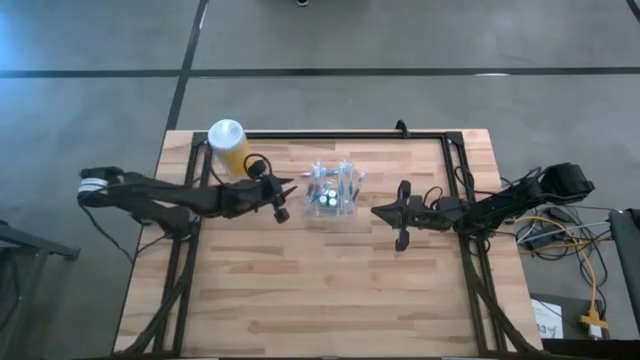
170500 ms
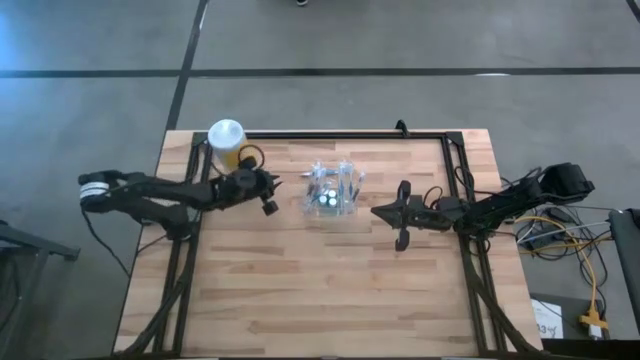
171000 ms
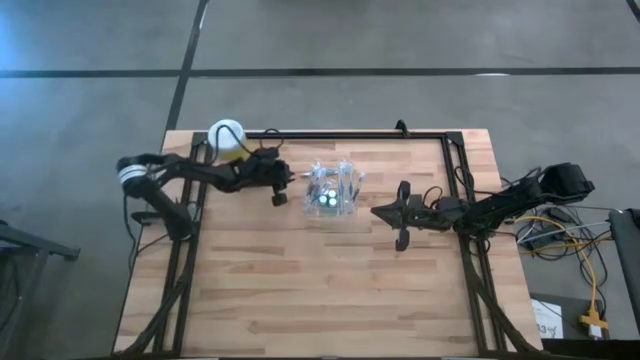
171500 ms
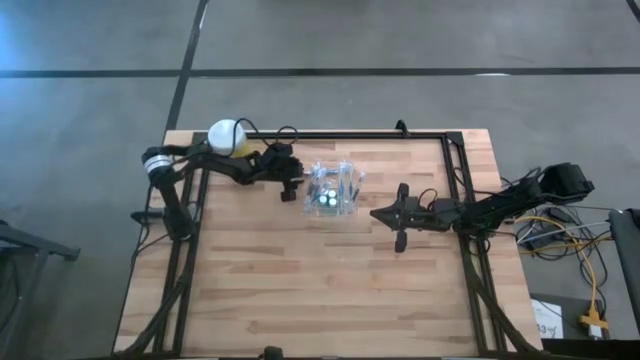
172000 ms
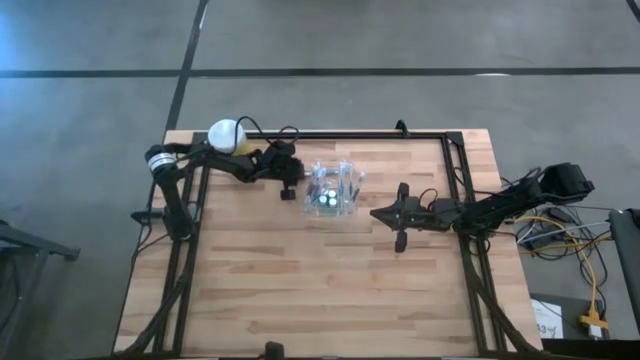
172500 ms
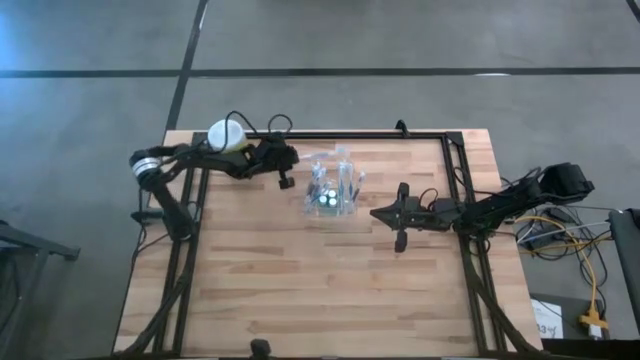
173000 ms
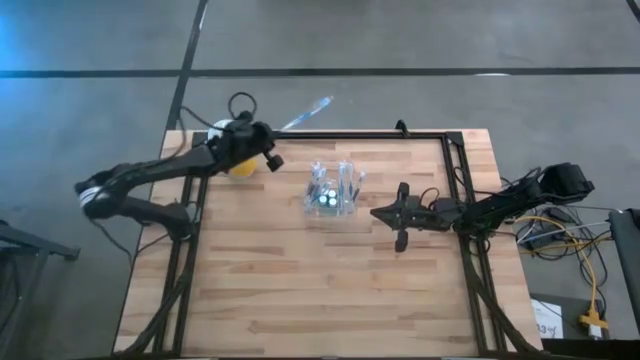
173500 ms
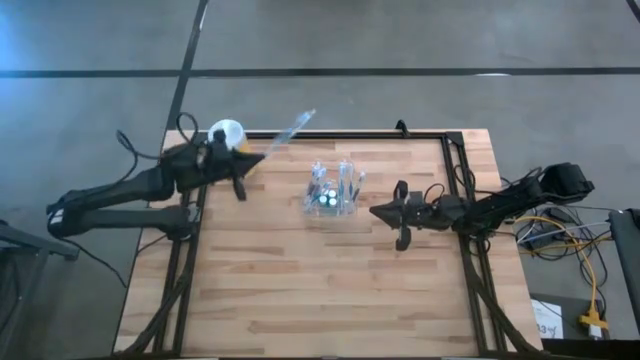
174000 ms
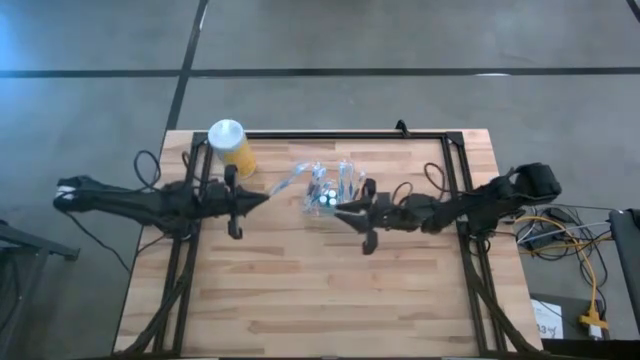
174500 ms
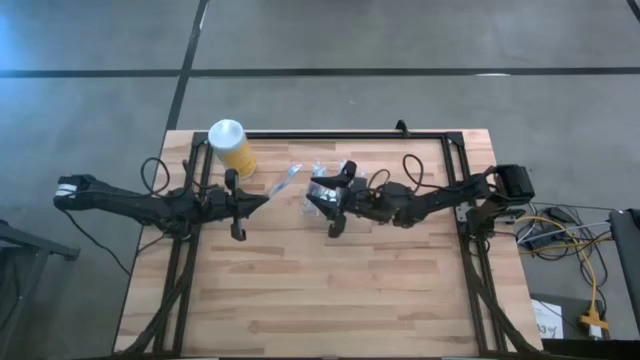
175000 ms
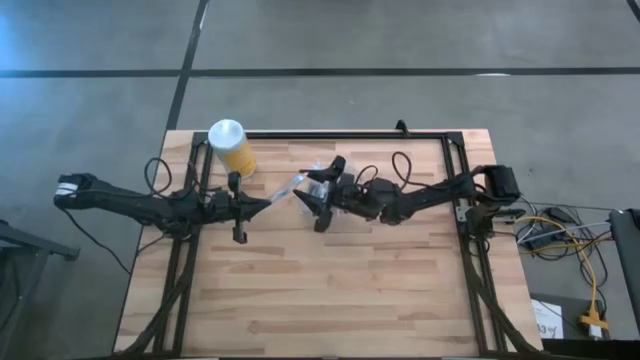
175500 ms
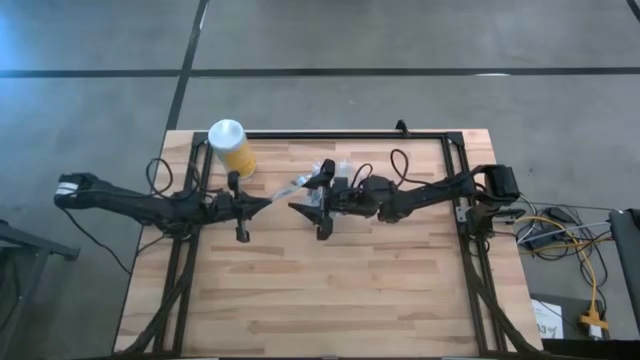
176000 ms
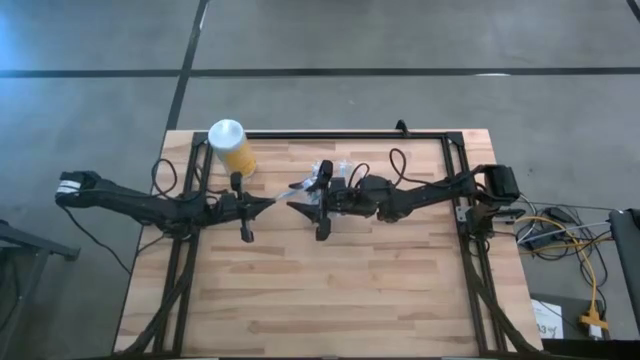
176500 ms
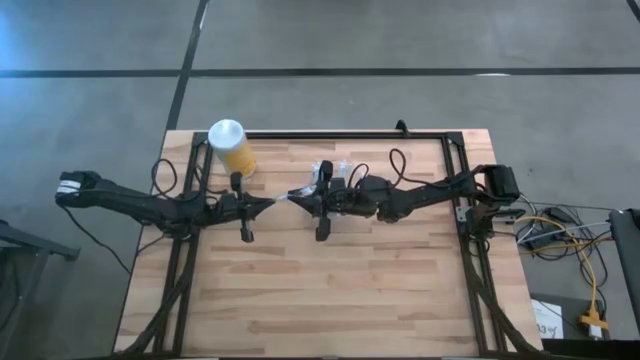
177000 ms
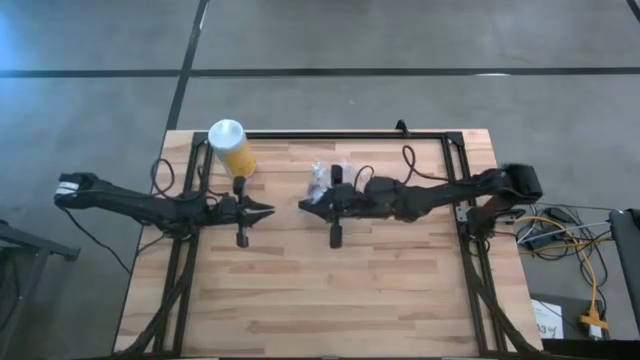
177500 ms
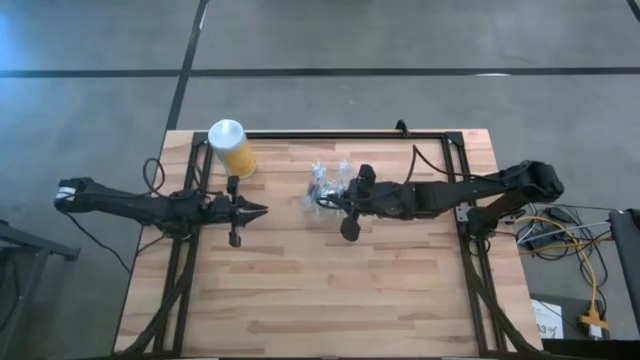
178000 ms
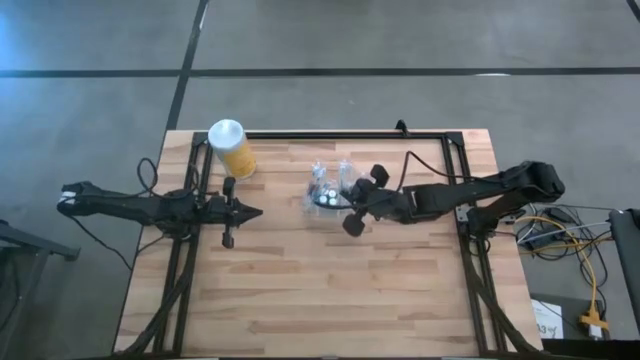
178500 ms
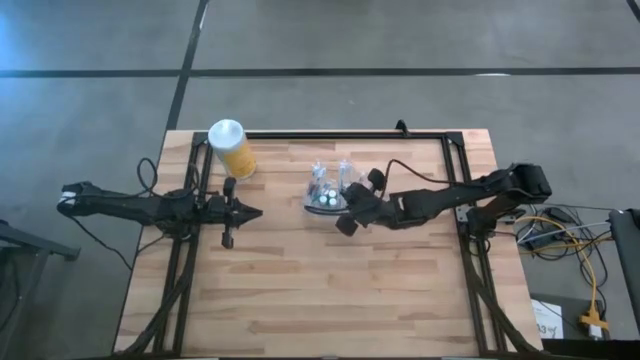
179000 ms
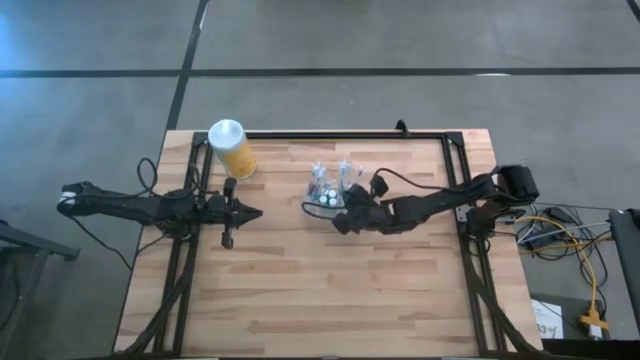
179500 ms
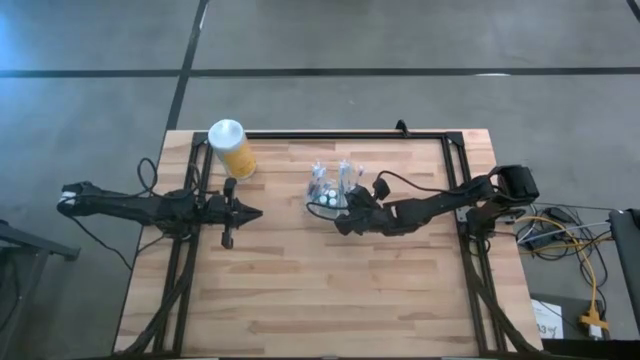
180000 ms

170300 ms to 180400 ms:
Task: Pick & Place toothbrushing station
Put the blue toothbrush into the right section of the transparent organizer

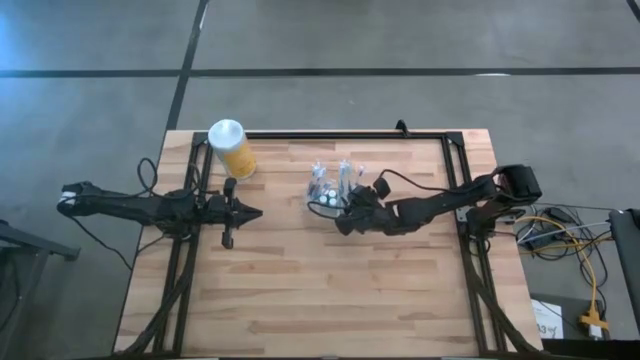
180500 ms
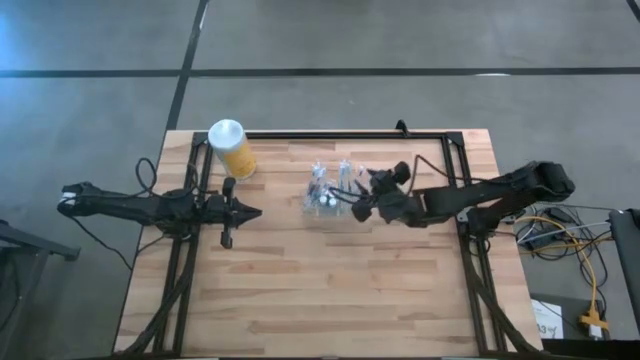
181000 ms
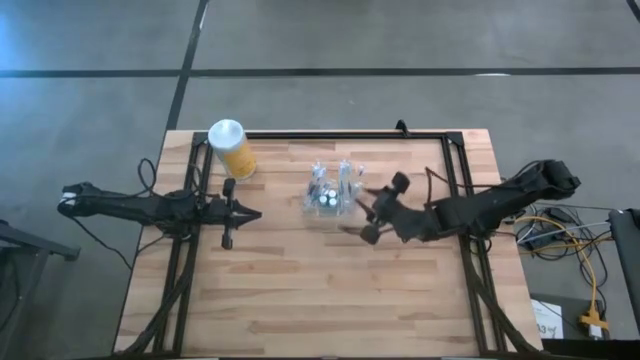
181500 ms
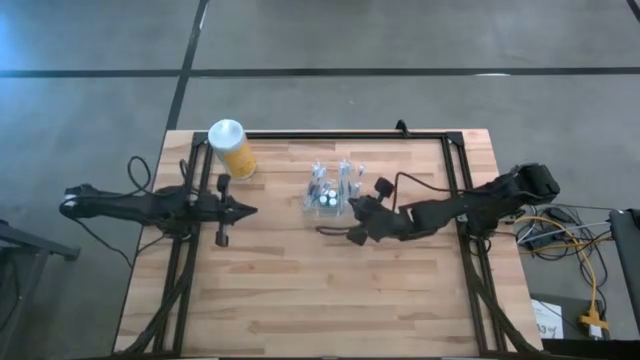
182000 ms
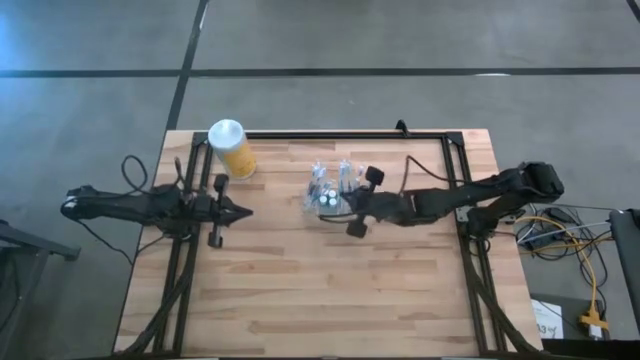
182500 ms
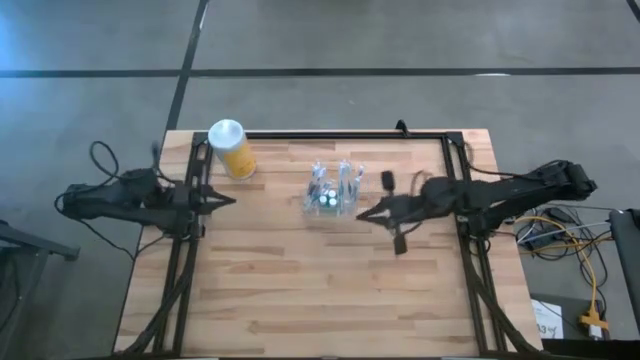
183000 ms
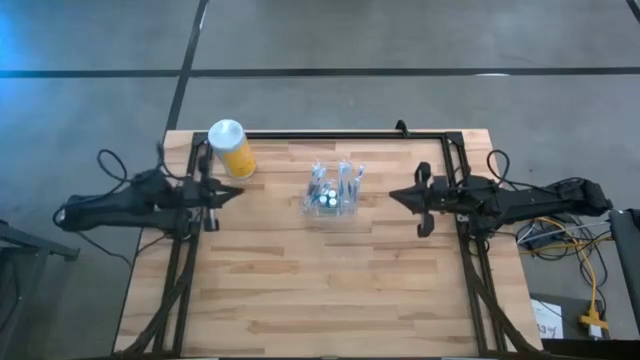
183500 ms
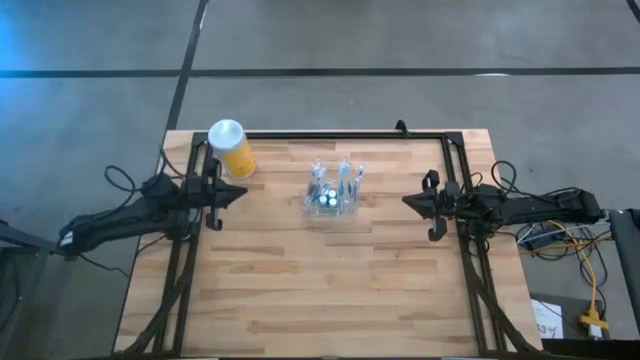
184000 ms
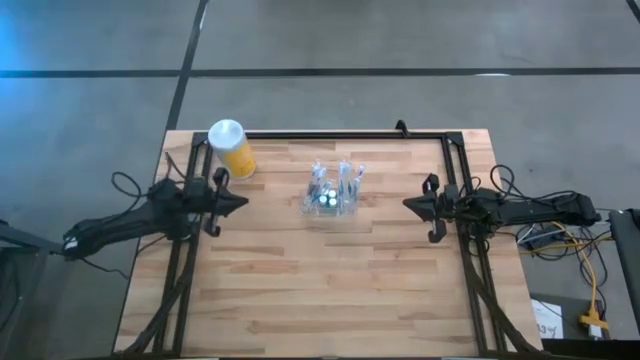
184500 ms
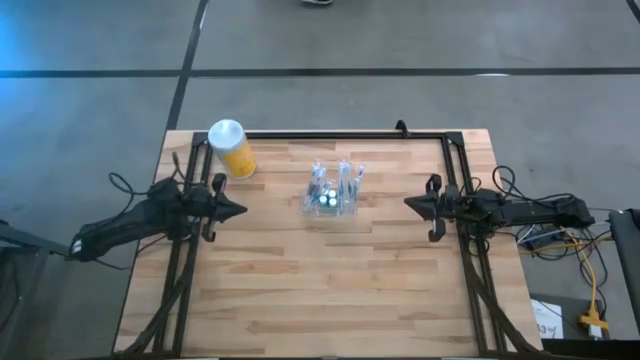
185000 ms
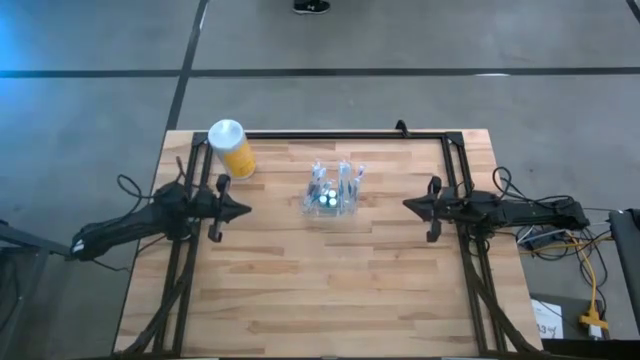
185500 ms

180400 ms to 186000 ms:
Return to Home Position

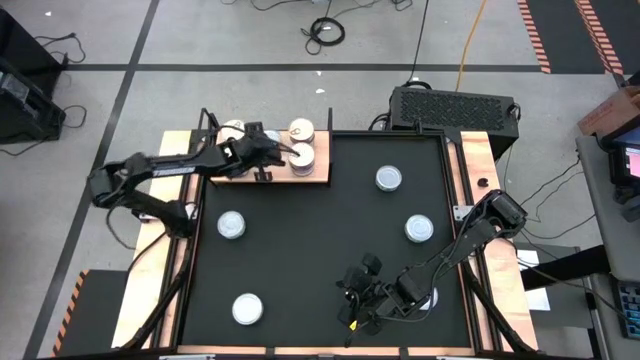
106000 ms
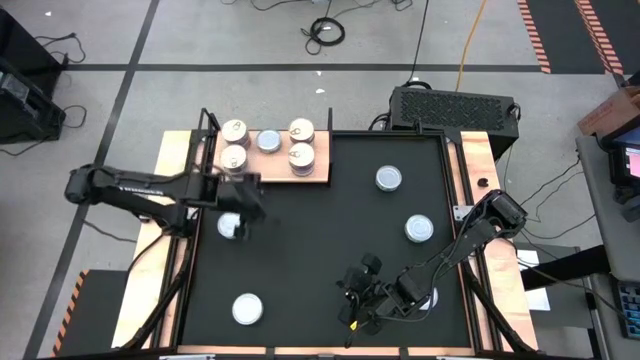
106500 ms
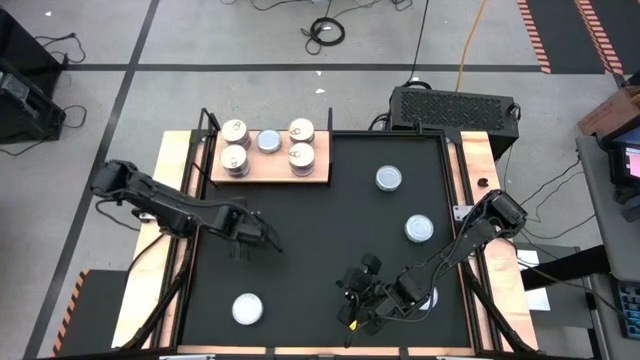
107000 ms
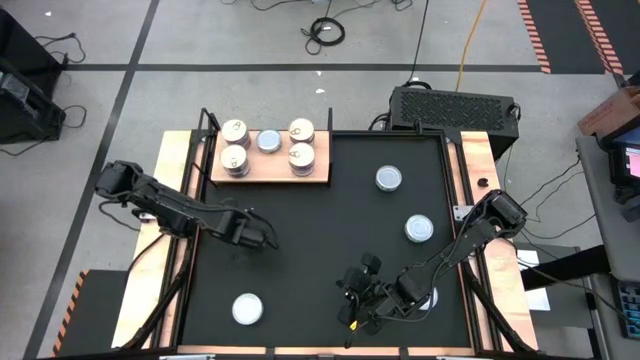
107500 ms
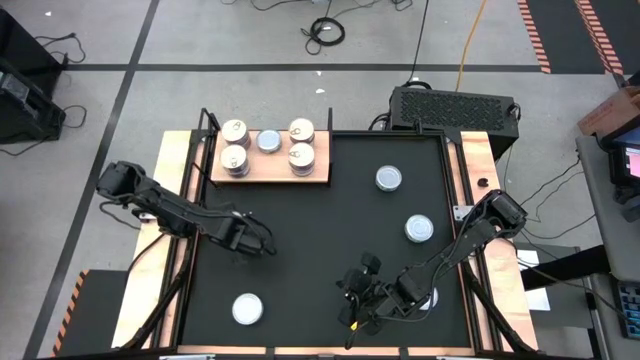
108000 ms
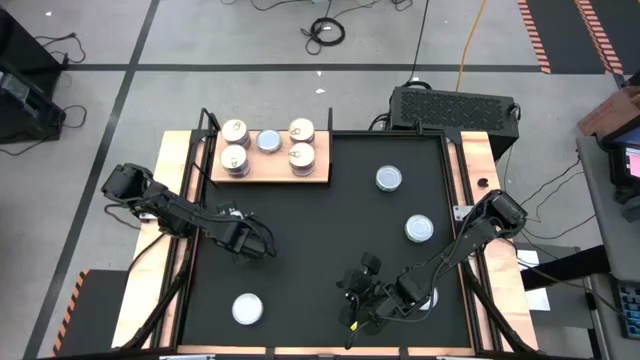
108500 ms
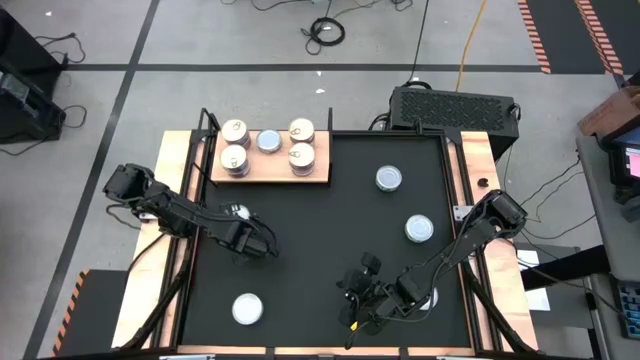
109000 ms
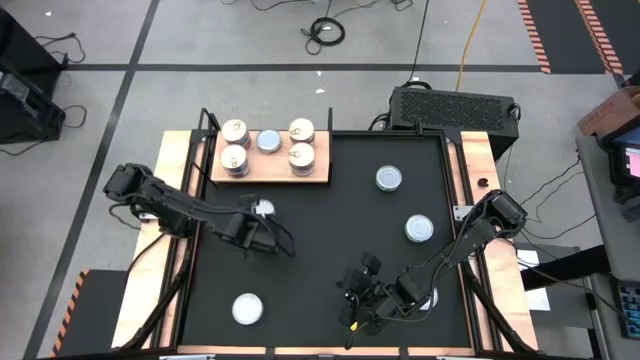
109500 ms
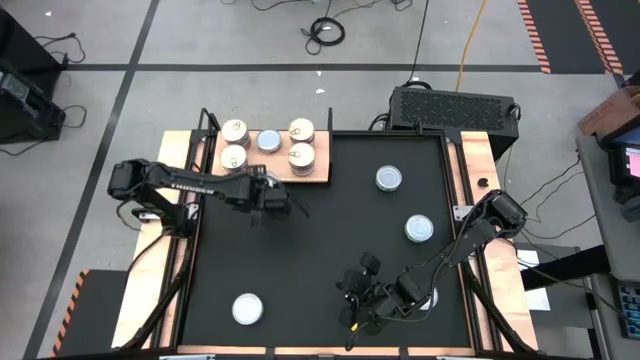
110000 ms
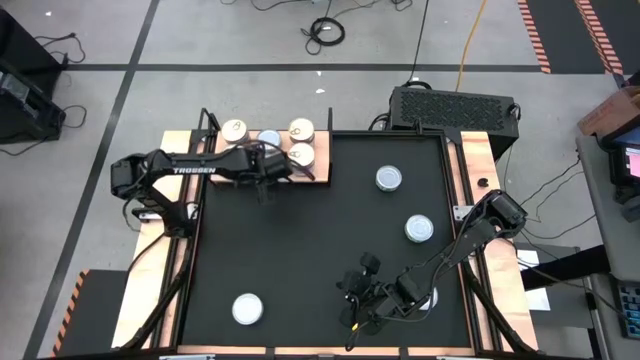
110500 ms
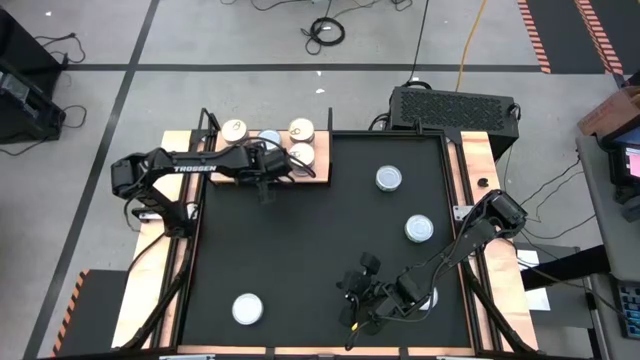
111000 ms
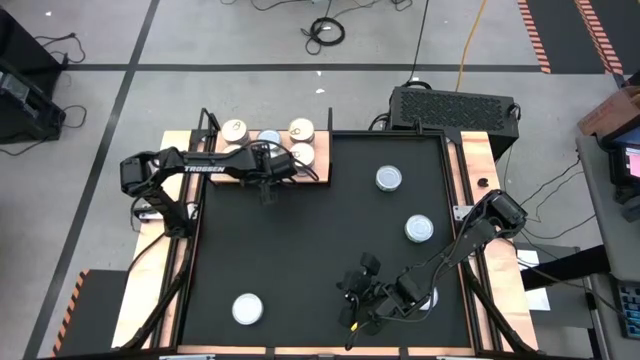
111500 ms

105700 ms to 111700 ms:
Task: Stack canned seafood by type on shelf
Put the green tuna can aligned with the green tuna can on the shelf
